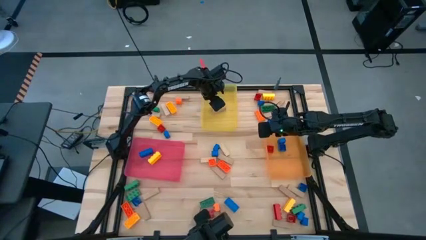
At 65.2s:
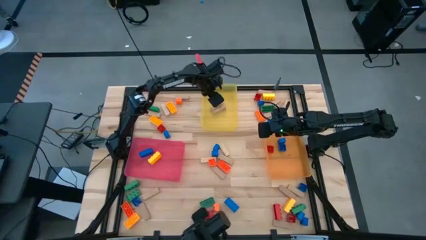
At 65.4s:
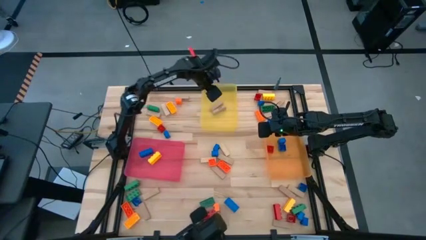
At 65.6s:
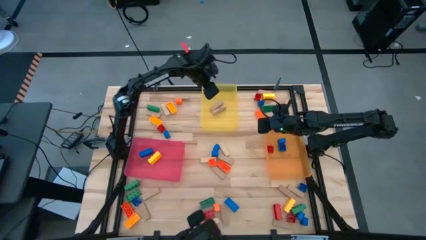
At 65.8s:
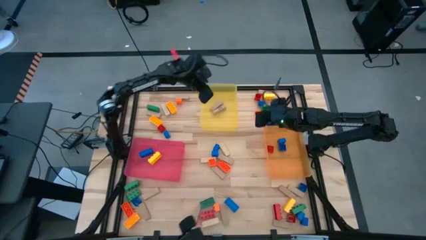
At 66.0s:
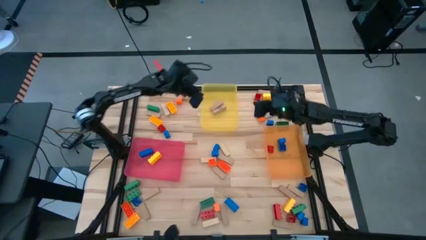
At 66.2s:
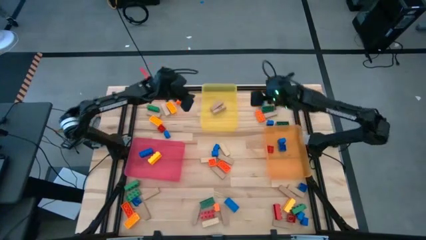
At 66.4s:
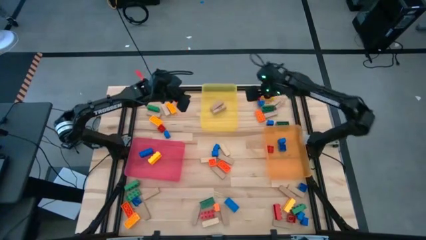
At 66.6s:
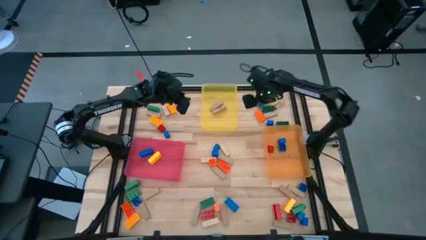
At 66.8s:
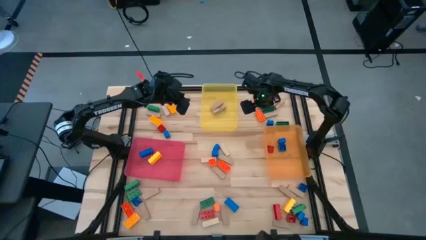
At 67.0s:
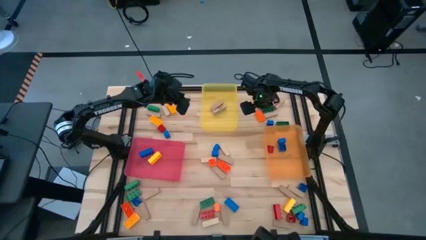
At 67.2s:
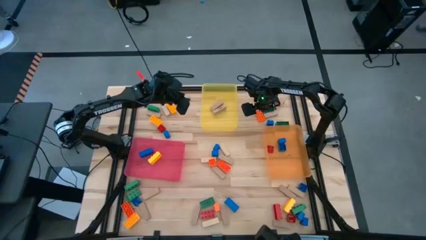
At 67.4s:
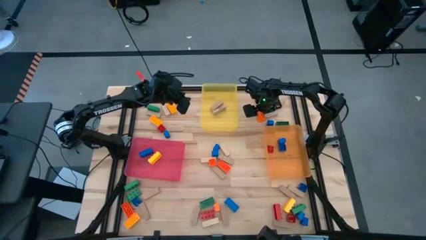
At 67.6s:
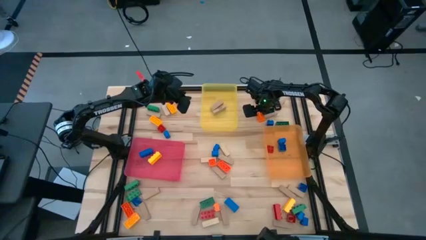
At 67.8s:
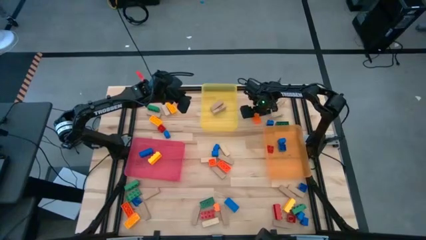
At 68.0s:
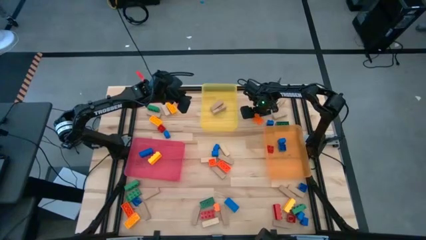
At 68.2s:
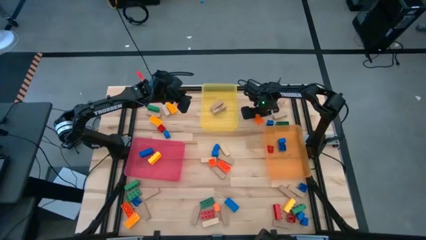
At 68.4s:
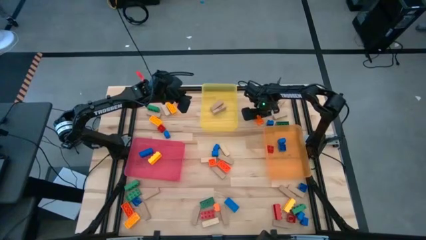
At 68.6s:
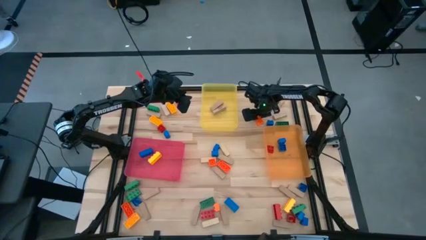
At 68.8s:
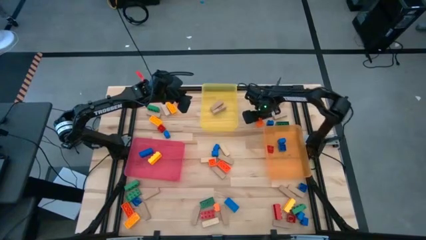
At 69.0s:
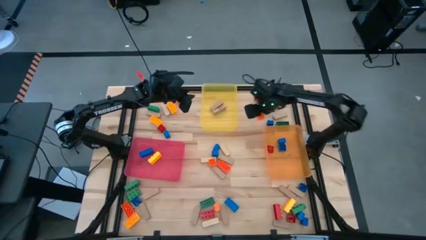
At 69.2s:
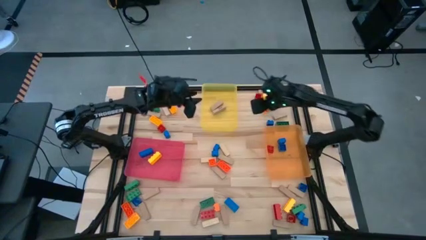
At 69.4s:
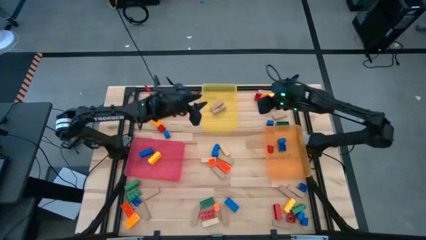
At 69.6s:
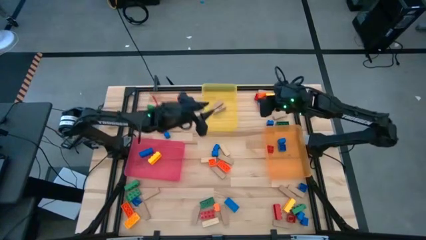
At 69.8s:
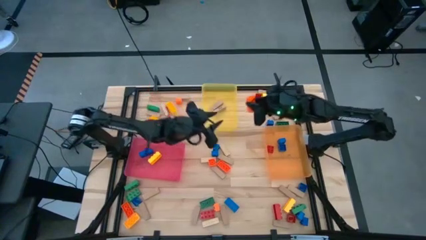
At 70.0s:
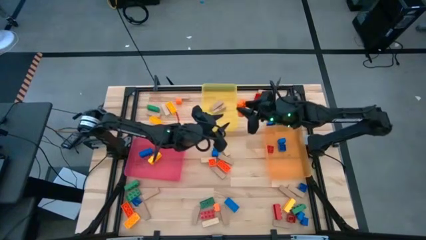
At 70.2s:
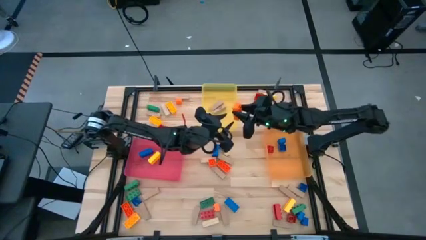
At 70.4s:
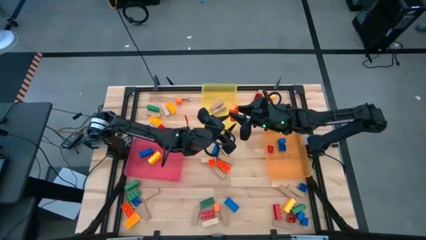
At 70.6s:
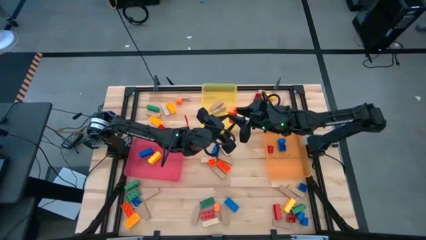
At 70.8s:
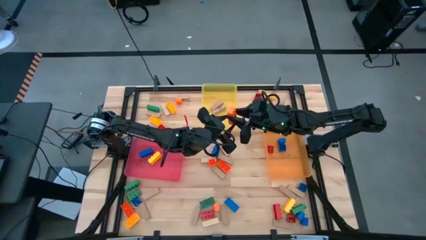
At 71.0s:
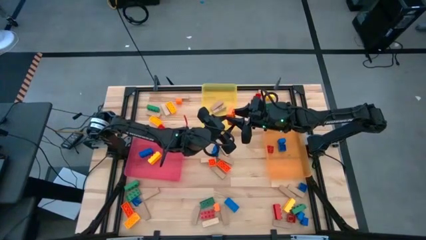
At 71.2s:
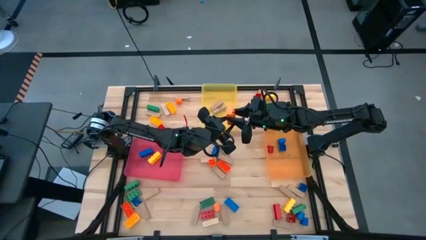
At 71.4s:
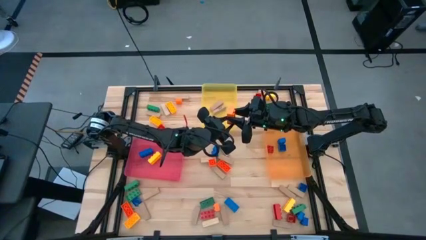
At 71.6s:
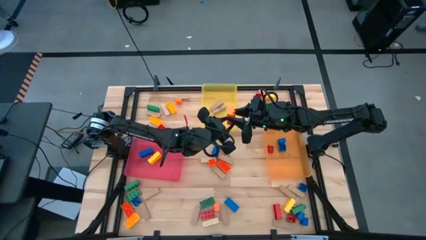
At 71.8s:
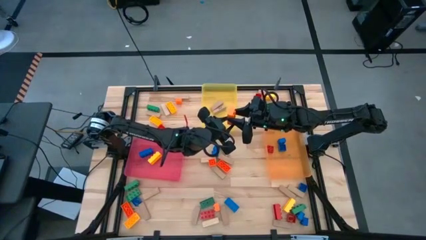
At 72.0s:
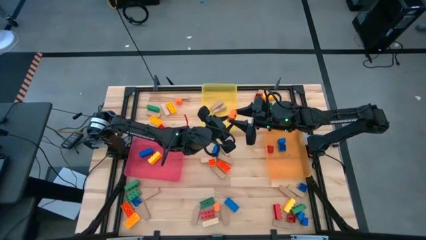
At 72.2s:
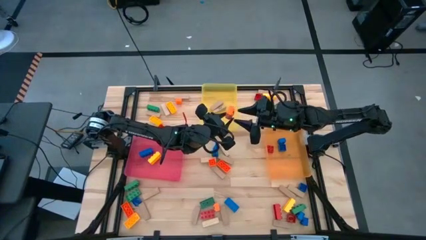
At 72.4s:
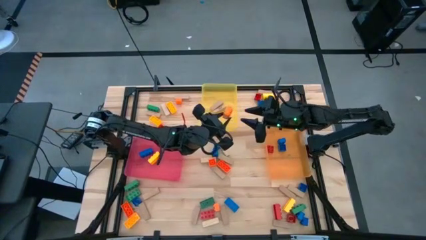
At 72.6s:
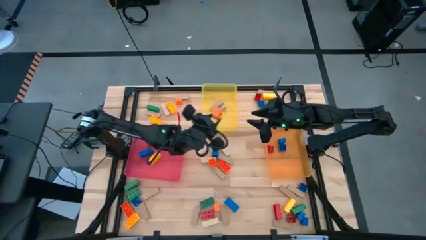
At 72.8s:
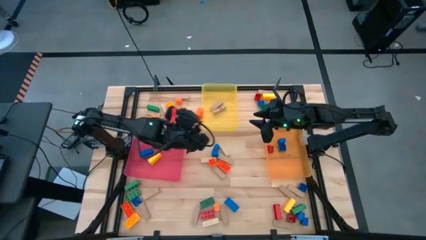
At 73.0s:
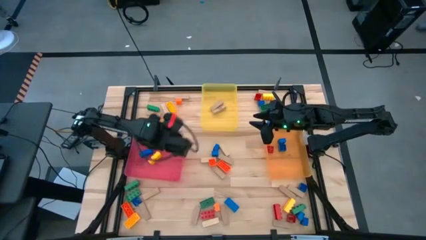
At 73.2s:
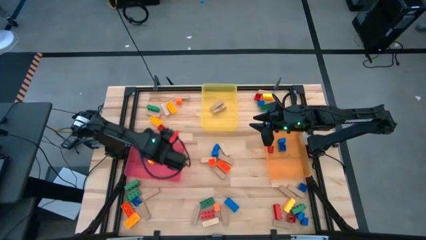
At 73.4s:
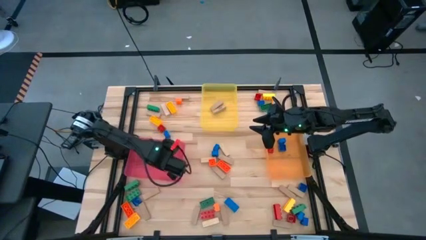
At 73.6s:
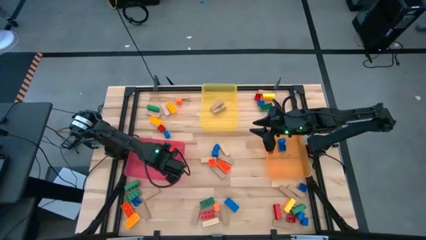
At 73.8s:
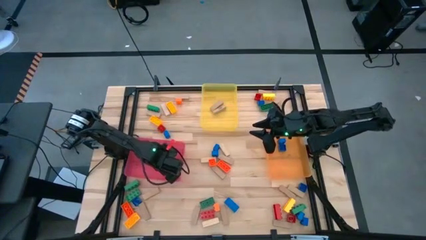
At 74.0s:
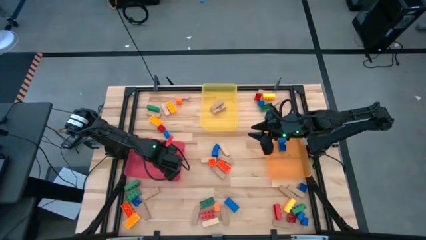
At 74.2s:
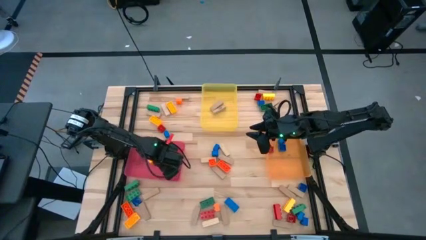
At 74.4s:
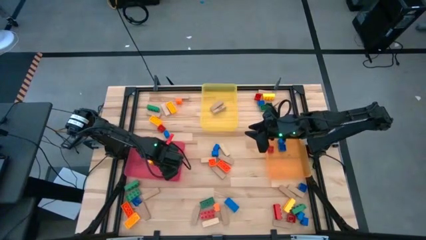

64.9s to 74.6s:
Task: Sort blocks by size
Put the 3 stud orange game piece into the pink bin

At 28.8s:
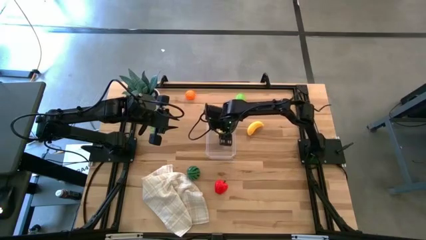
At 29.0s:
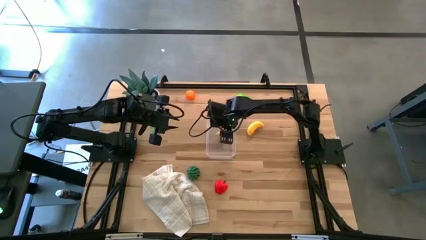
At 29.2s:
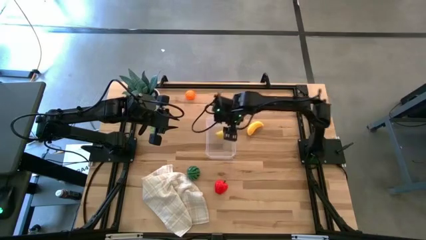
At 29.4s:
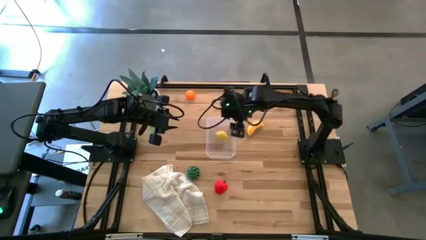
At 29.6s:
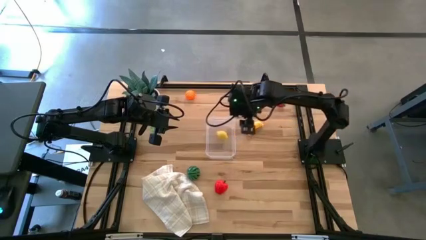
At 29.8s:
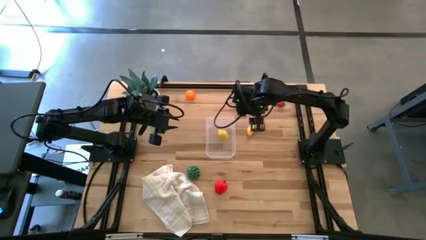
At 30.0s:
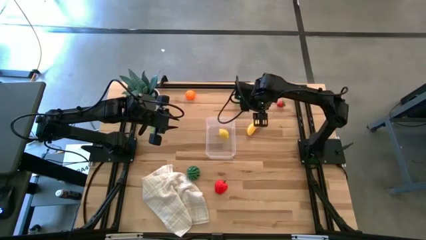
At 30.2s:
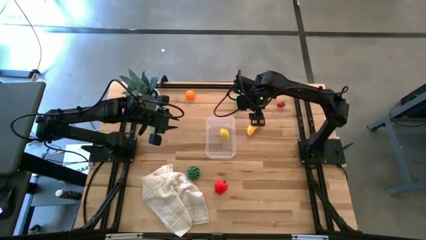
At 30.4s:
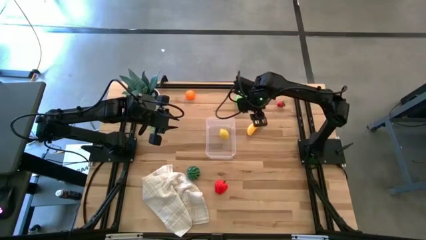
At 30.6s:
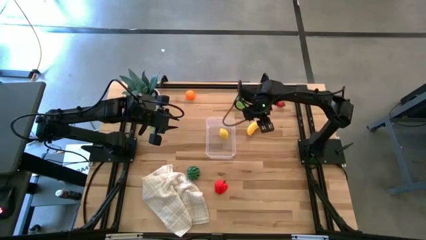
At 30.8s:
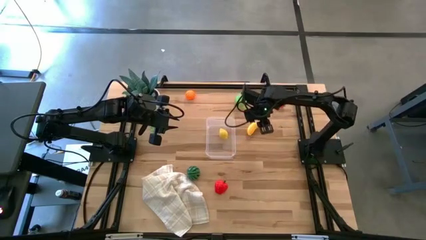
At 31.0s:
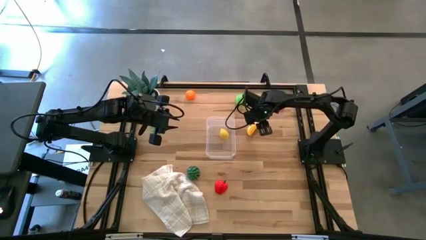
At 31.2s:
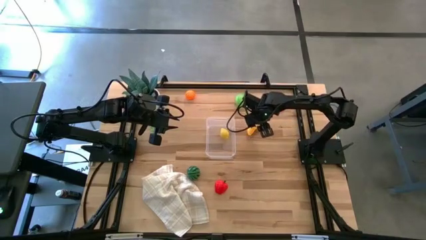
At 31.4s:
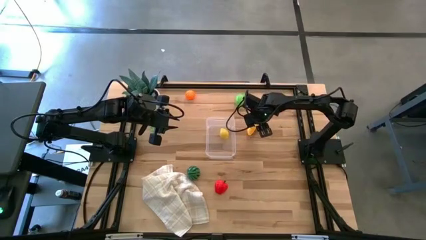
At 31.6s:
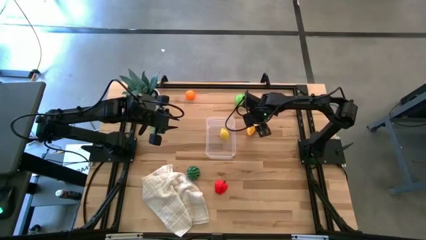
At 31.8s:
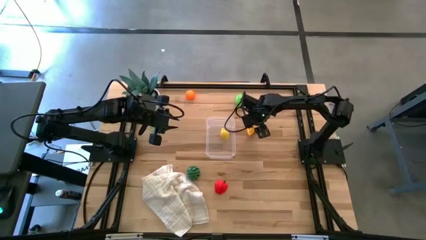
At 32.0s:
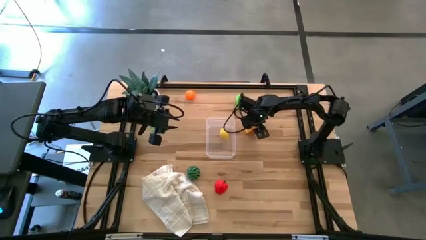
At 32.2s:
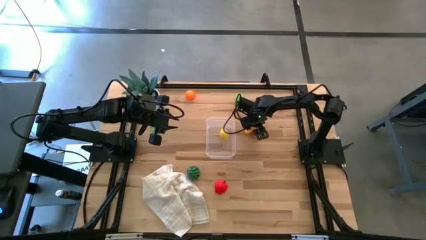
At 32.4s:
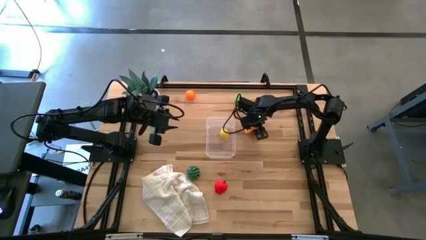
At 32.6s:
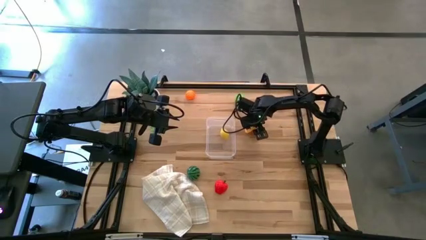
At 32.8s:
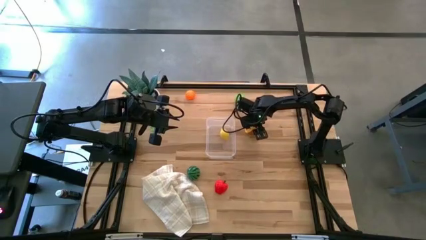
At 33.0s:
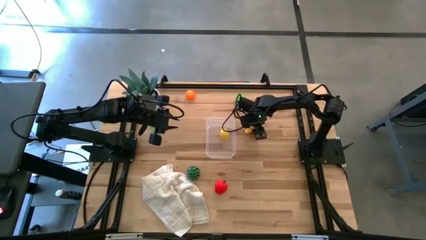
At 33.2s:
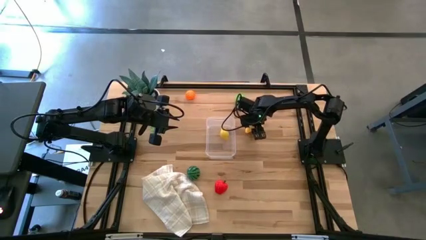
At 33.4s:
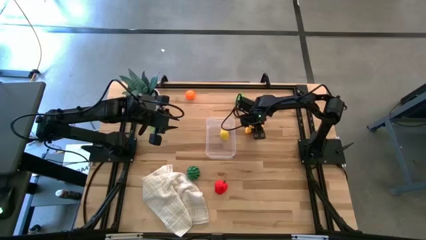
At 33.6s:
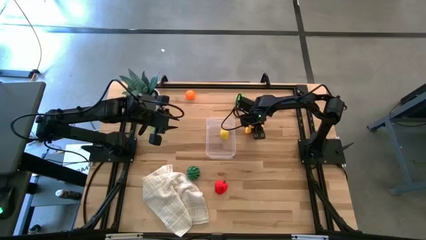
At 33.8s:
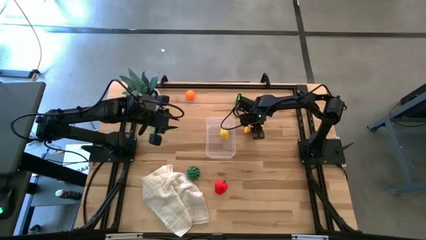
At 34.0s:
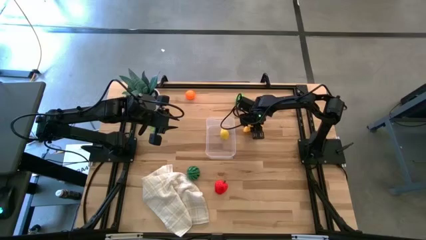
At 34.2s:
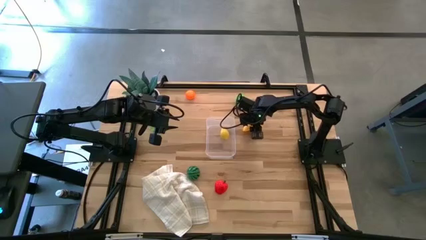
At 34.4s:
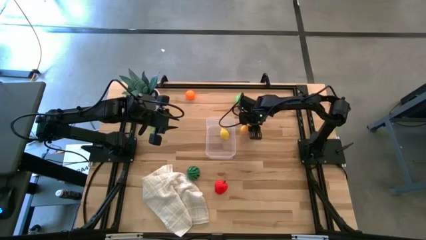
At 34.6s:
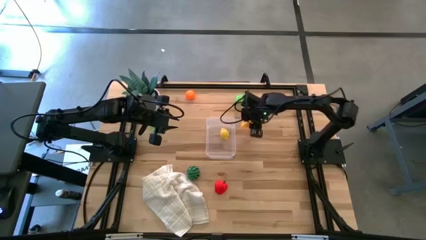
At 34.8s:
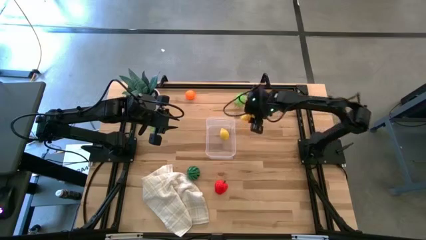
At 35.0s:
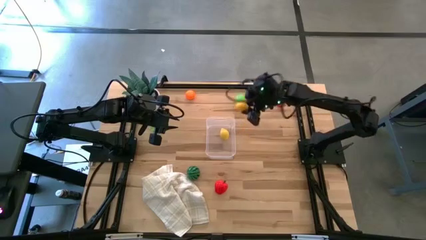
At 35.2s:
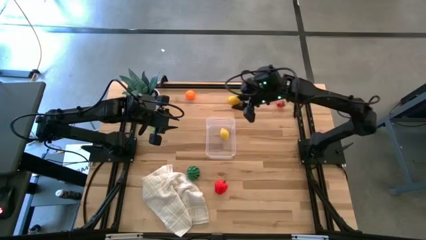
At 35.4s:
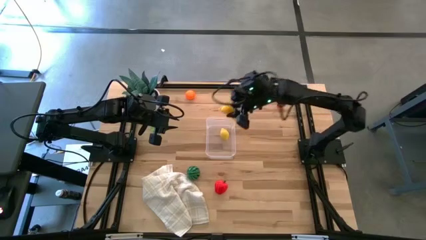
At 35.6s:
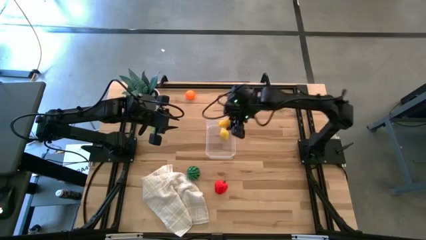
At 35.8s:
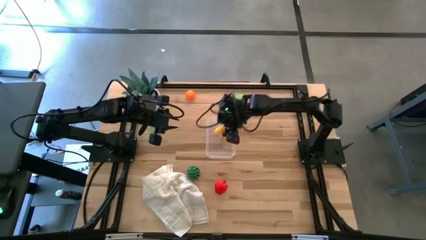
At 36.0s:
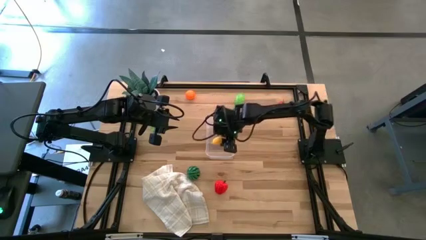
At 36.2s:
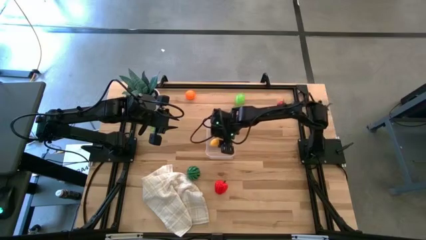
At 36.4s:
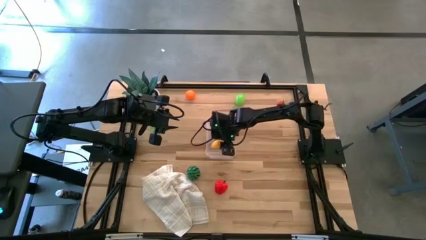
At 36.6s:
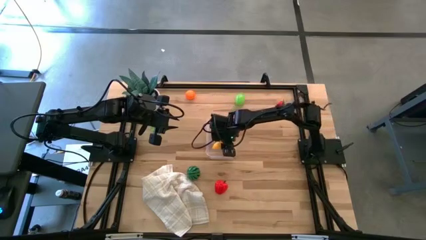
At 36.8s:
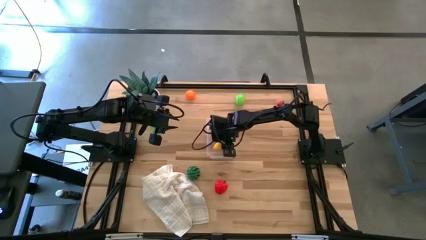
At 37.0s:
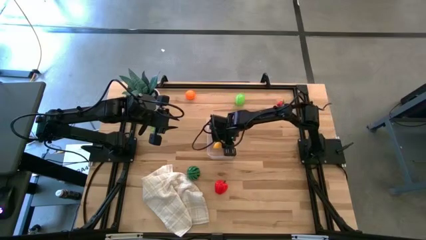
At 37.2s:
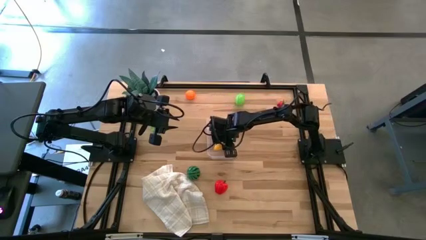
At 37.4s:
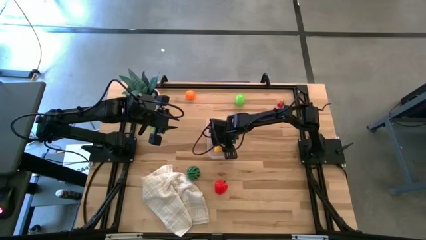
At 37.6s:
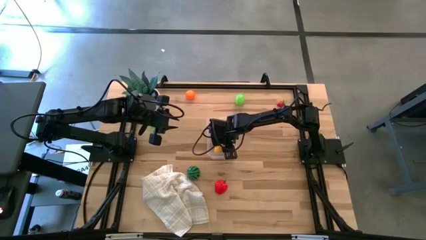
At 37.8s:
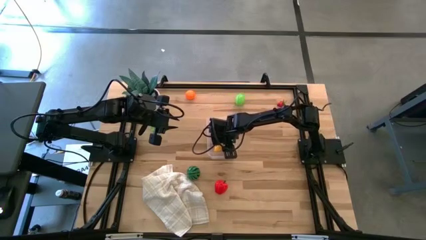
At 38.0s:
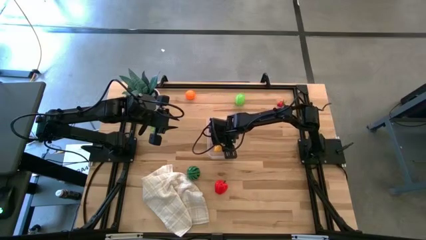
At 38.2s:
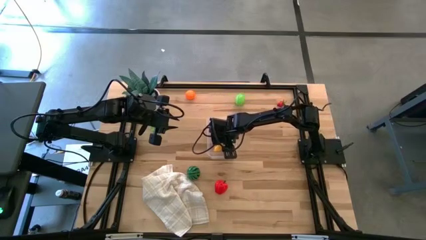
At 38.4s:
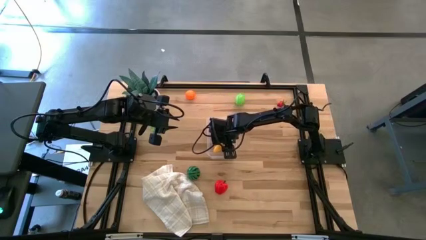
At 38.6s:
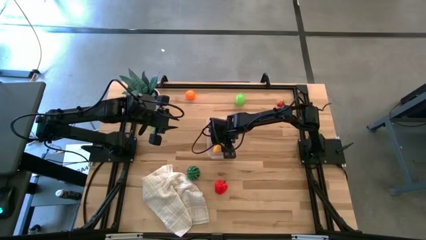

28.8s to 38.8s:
Task: Pick and placing Produce into tupperware
Put the yellow banana into the transparent bin
